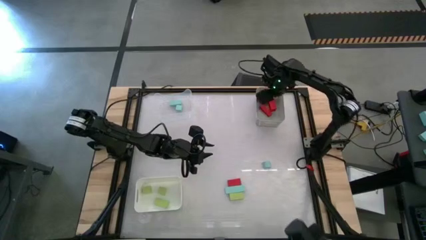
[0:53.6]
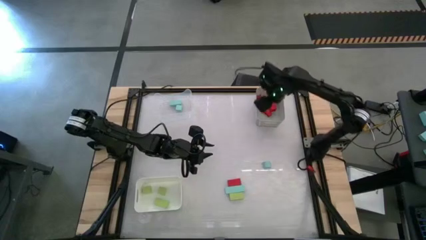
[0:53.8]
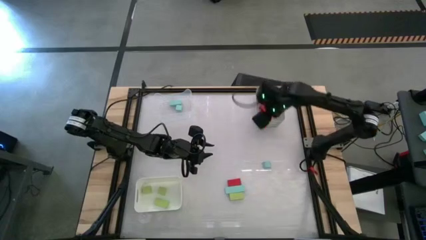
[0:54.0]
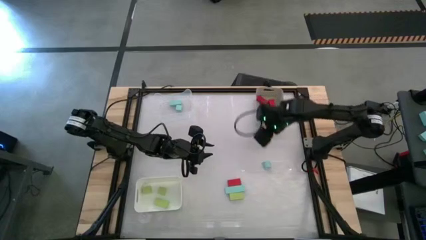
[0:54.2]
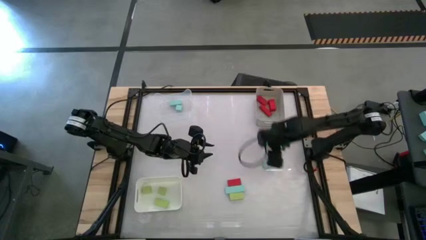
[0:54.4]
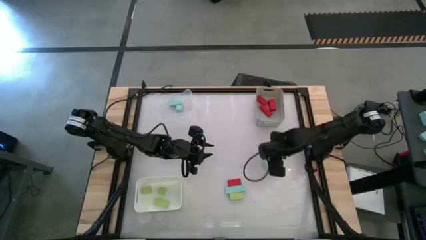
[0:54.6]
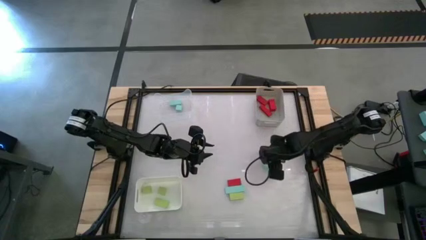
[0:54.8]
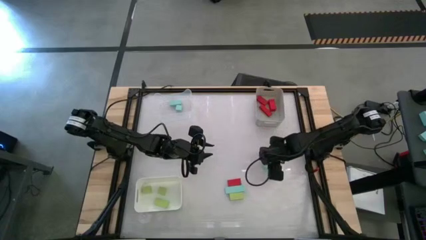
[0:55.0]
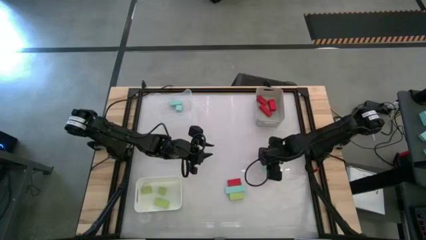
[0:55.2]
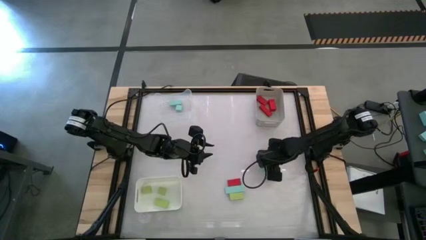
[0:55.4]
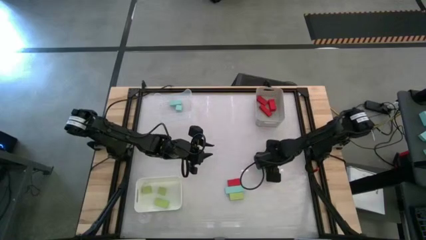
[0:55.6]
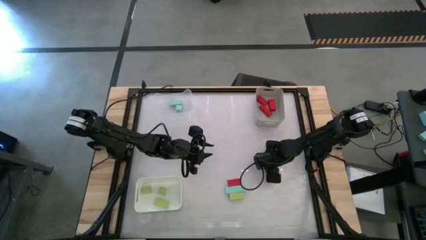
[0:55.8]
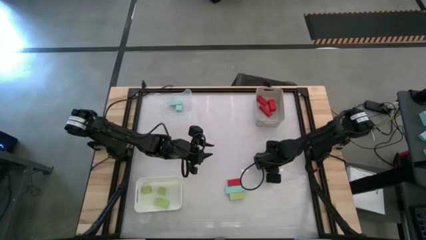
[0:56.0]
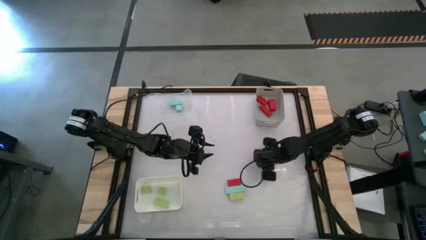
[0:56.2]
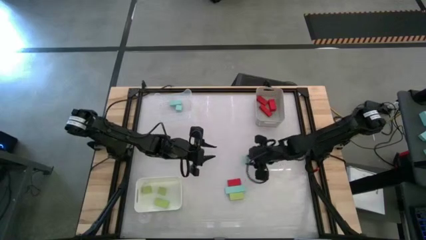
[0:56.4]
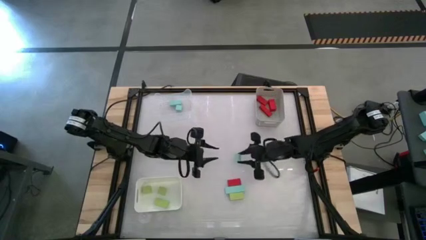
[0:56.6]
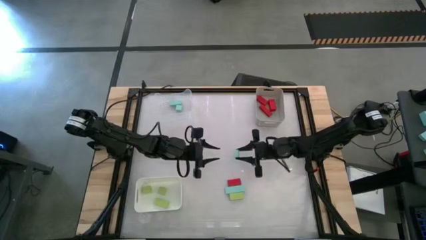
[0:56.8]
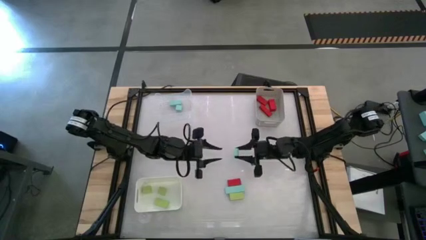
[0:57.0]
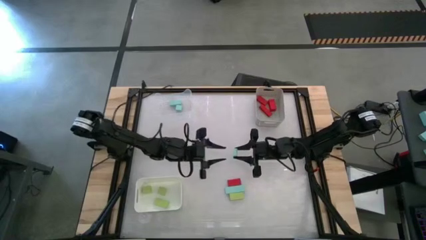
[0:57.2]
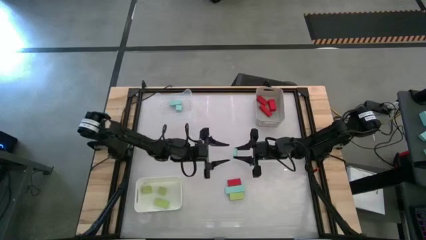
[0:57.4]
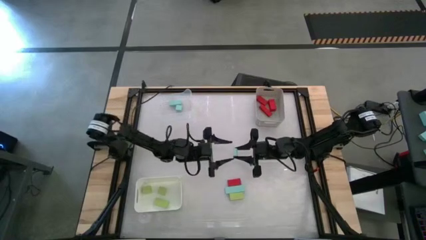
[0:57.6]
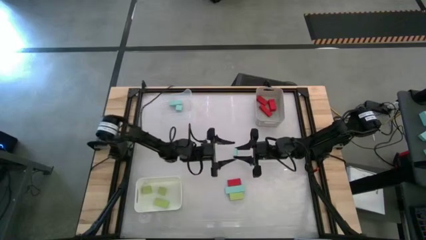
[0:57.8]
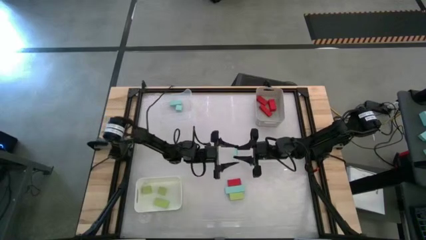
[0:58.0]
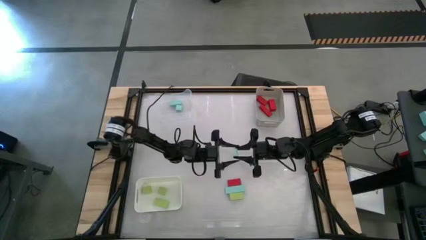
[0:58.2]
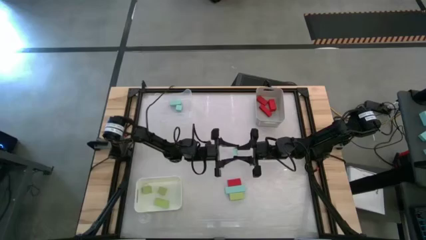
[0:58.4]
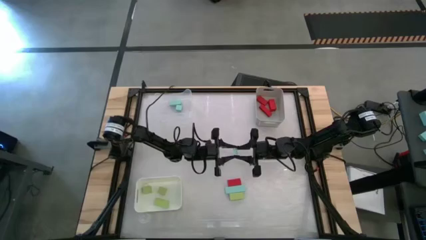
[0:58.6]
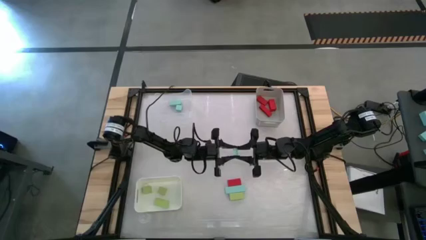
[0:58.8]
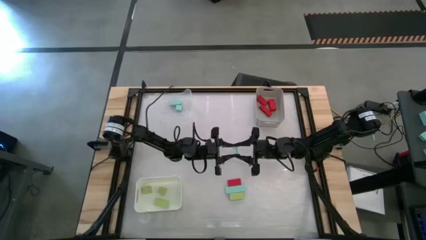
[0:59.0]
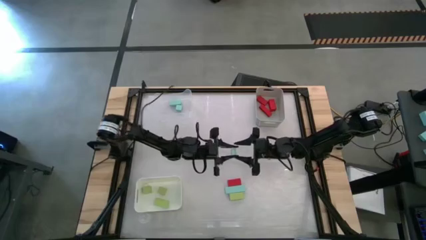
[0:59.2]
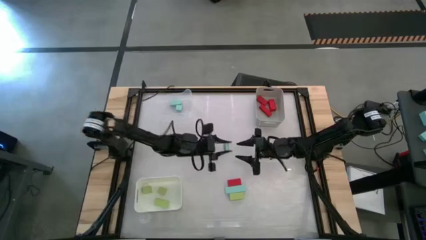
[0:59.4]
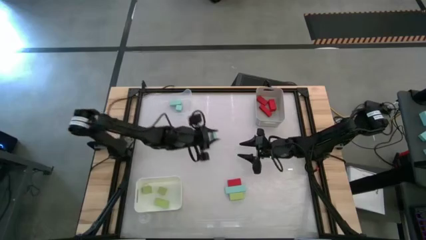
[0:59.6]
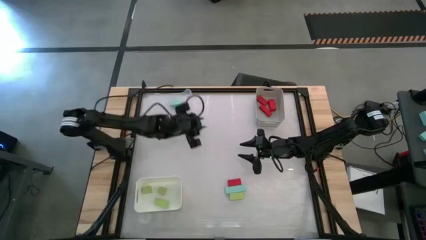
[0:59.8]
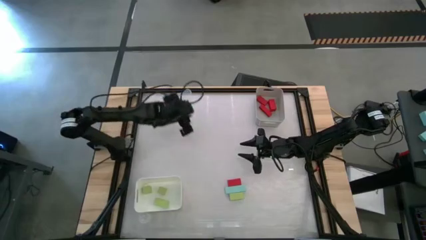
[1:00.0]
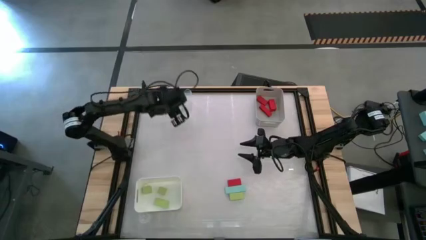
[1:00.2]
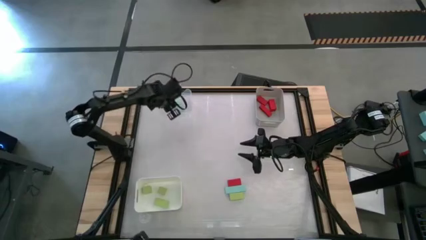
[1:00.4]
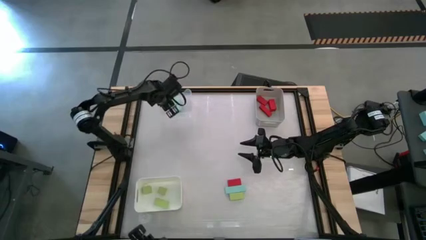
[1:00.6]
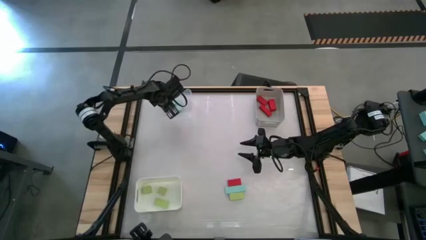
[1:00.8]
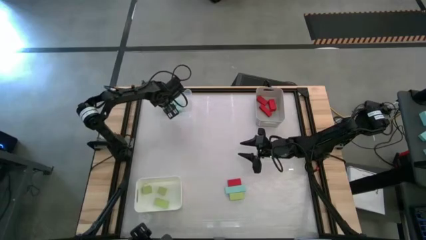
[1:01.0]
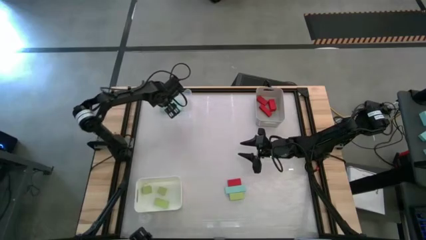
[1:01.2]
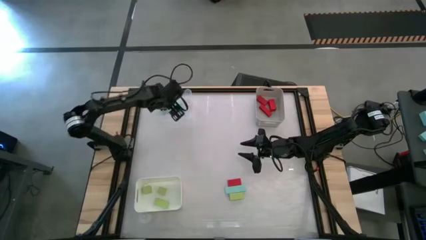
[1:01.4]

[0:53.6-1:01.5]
Task: Sort & place blocks by color
Put the right blue block into the transparent bin

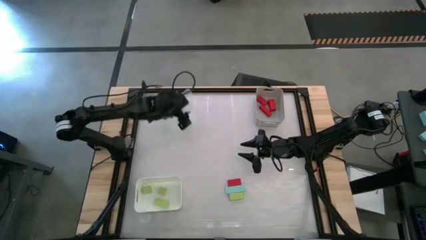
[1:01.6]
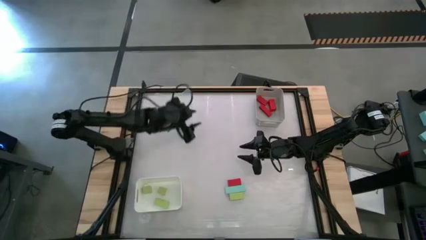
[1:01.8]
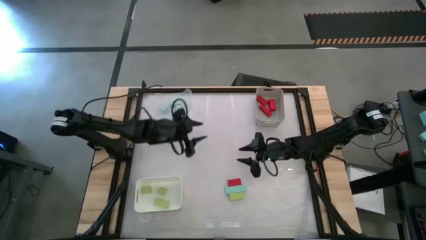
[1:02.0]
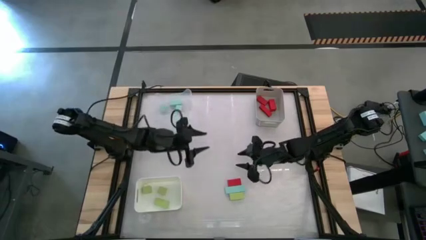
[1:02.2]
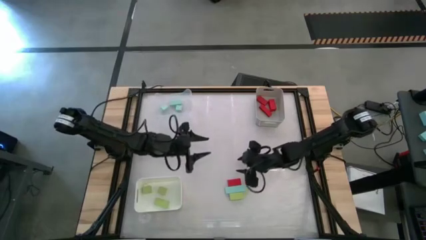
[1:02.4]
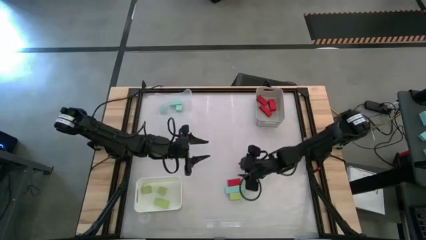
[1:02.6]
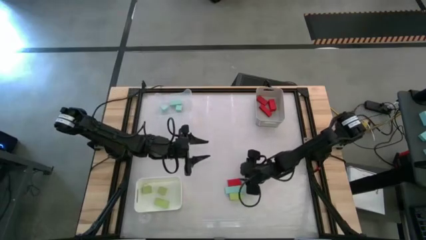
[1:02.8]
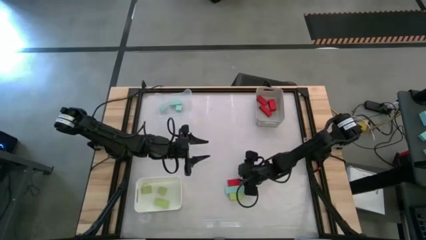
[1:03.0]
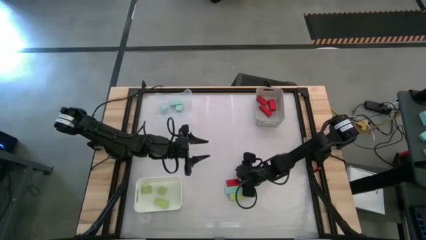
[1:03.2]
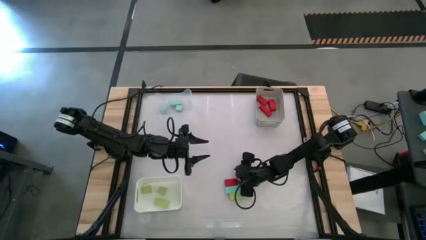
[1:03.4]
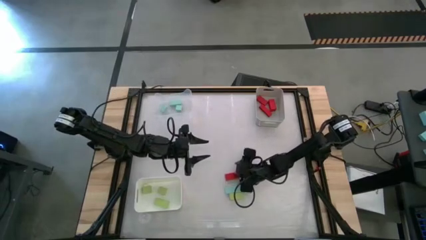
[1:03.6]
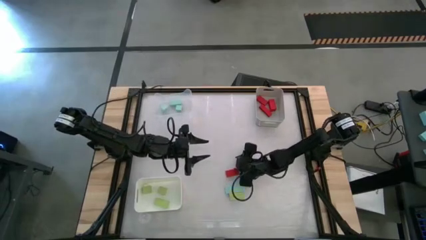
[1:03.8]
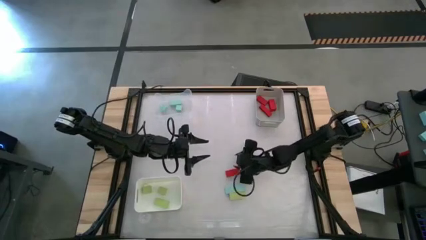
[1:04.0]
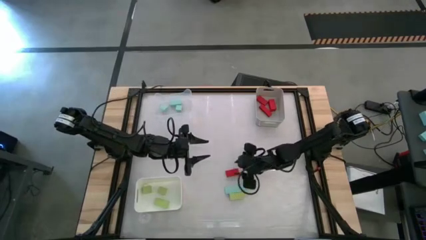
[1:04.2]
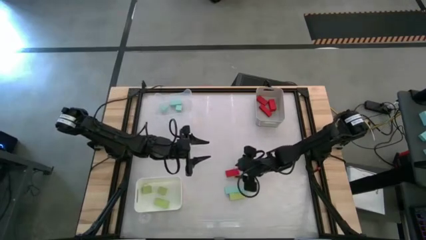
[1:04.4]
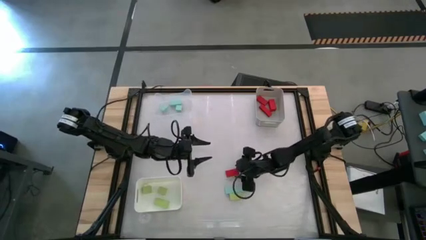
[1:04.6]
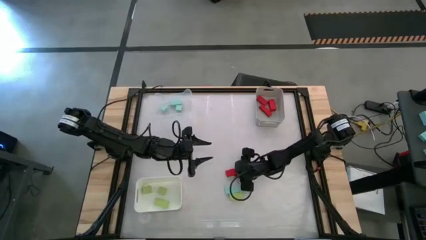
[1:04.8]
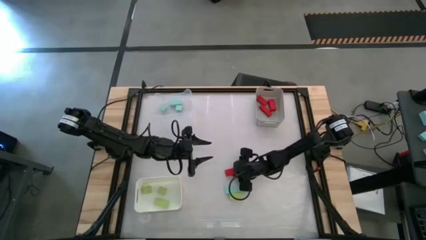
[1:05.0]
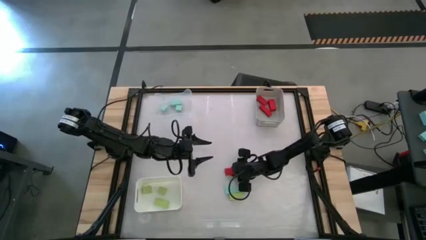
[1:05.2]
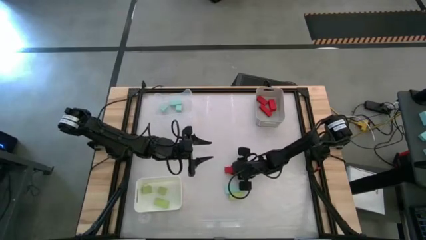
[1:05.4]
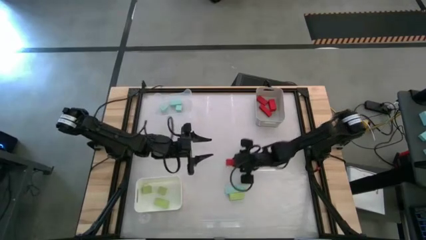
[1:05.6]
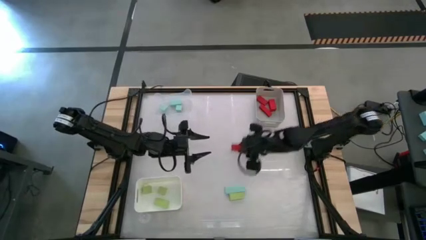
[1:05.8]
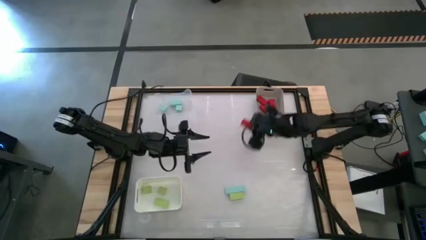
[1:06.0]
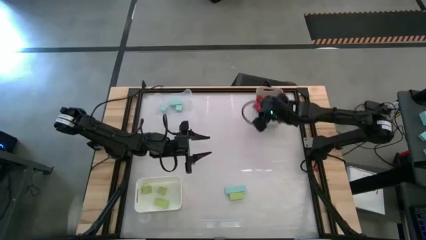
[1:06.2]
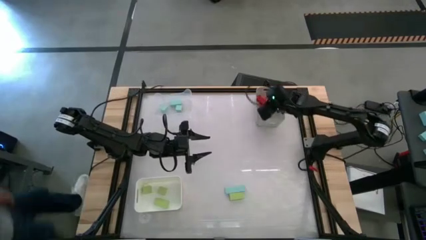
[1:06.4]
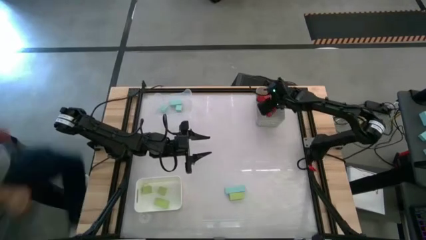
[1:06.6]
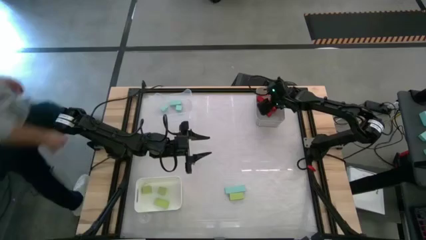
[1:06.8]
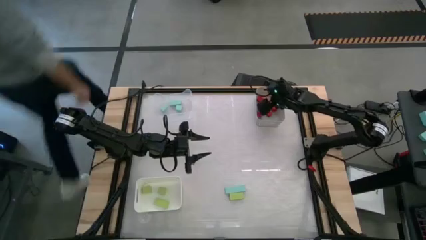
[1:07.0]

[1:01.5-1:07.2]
Put the red block into the gray bin

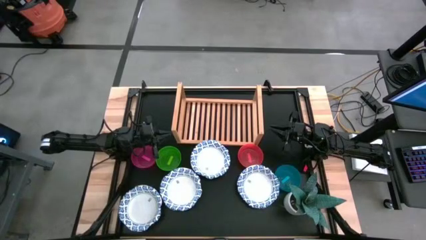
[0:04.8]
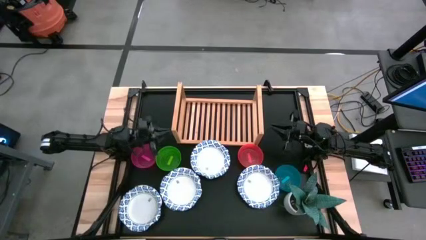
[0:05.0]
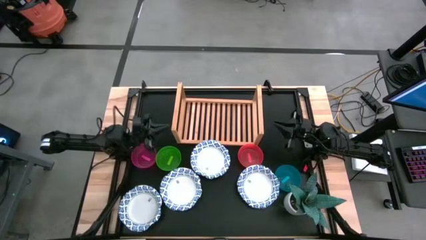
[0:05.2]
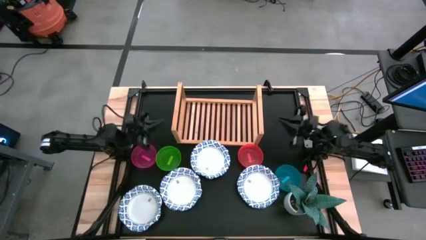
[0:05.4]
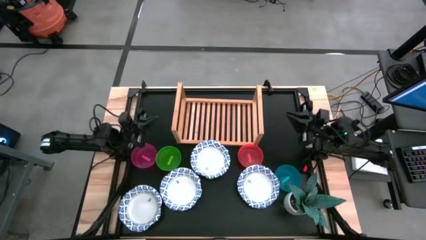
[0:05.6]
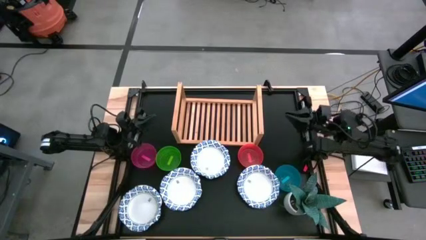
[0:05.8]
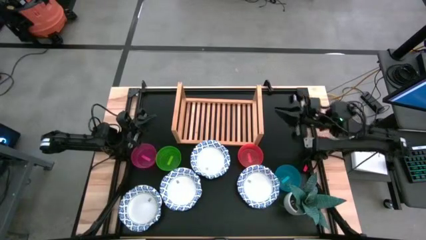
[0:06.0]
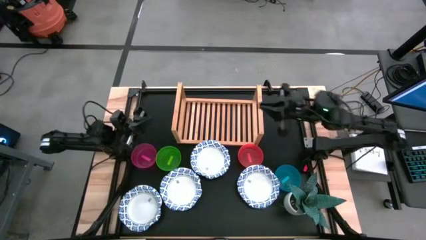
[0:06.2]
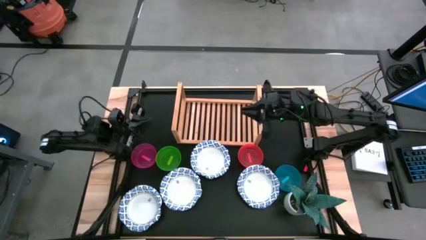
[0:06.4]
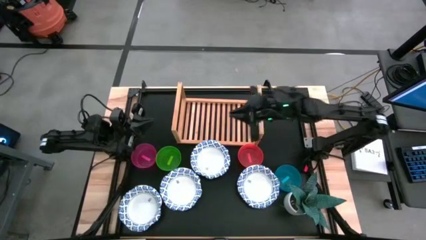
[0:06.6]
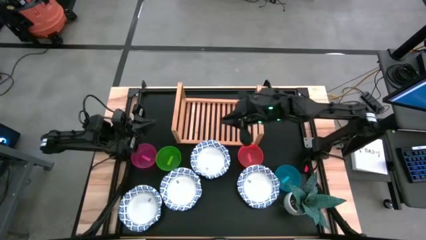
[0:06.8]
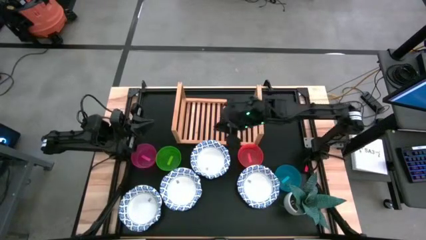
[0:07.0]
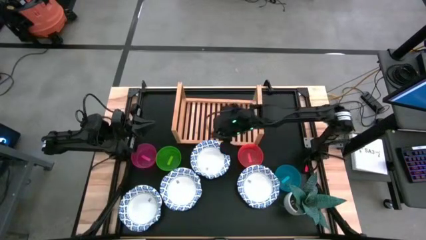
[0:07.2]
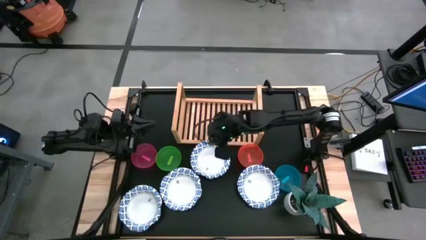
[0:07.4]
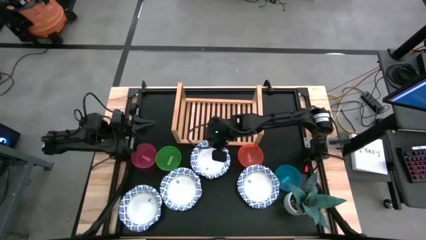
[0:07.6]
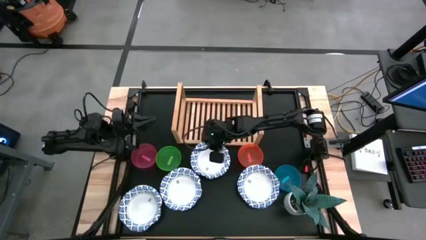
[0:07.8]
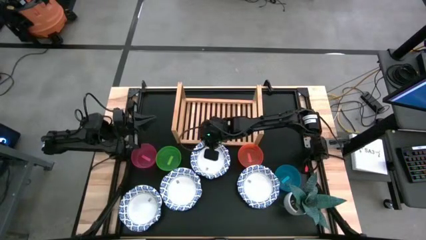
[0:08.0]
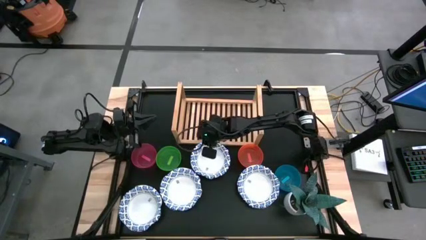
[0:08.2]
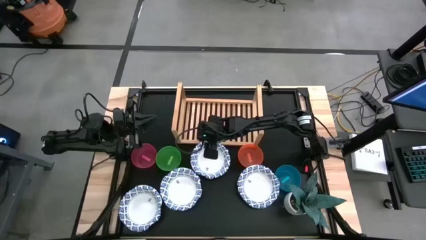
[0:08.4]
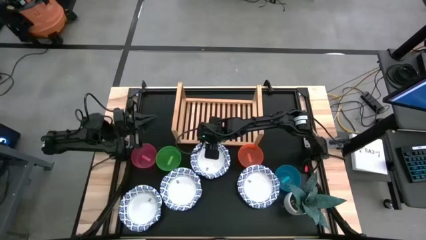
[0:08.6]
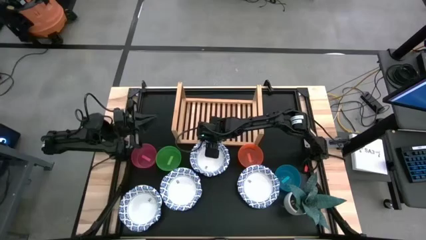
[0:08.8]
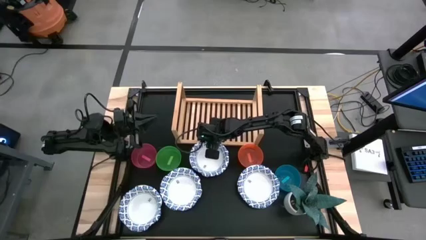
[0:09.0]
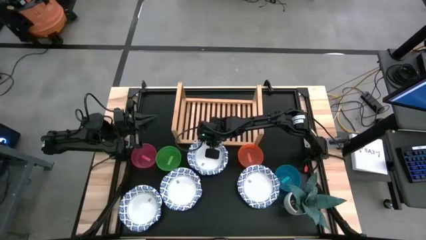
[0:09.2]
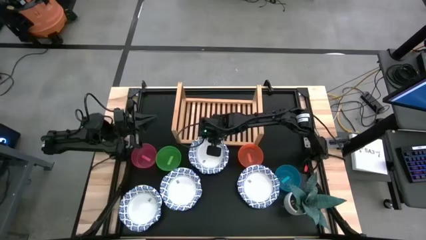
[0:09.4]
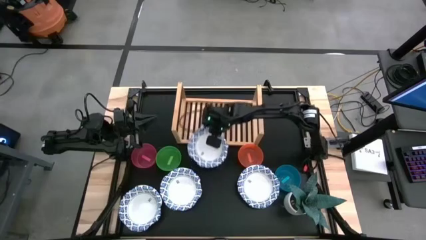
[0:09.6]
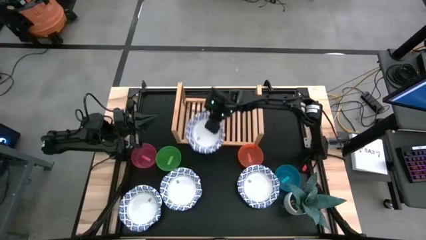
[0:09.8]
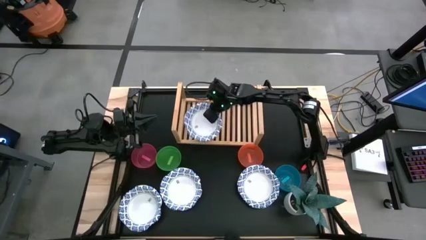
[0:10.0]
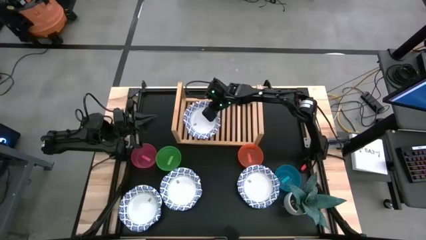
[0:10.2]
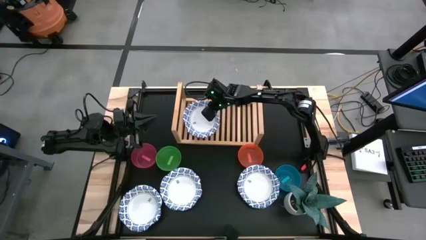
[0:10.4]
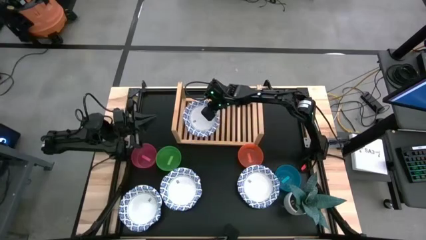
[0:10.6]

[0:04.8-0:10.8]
Task: Place and stack bowls onto a shelf
Put the large white bowl on the shelf
